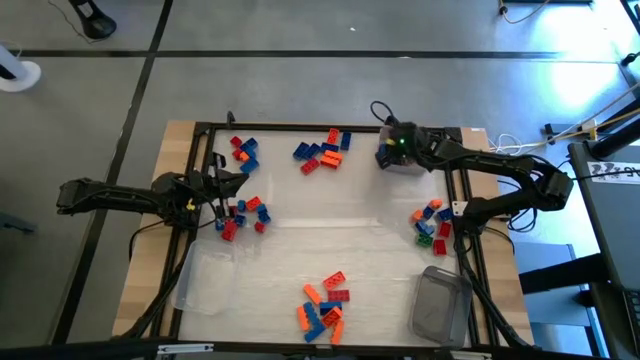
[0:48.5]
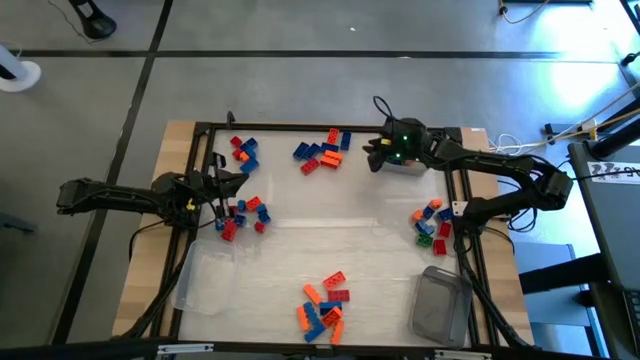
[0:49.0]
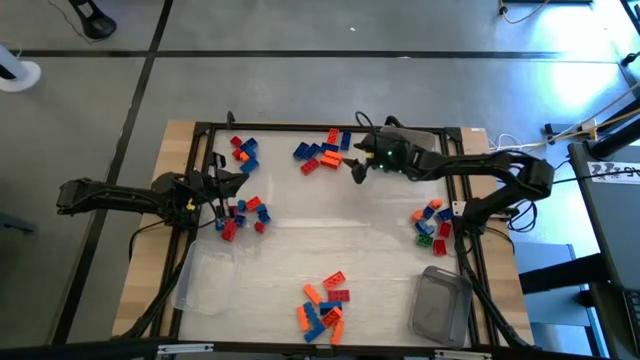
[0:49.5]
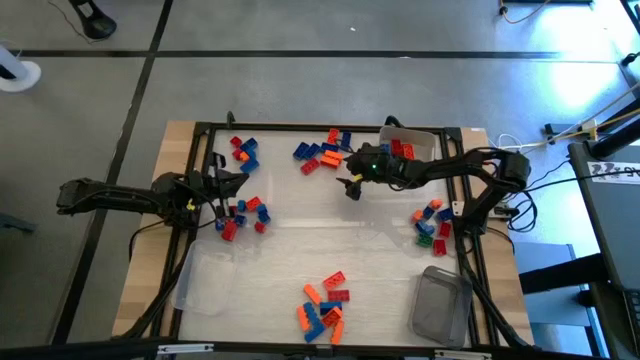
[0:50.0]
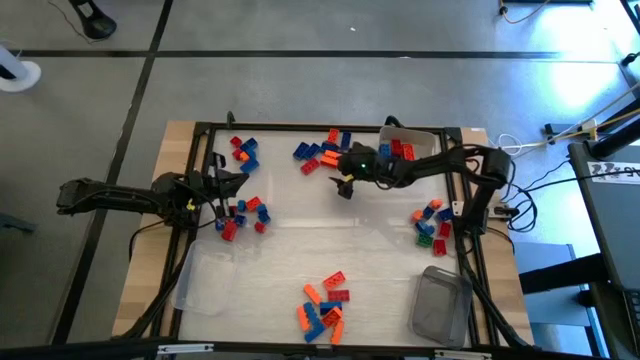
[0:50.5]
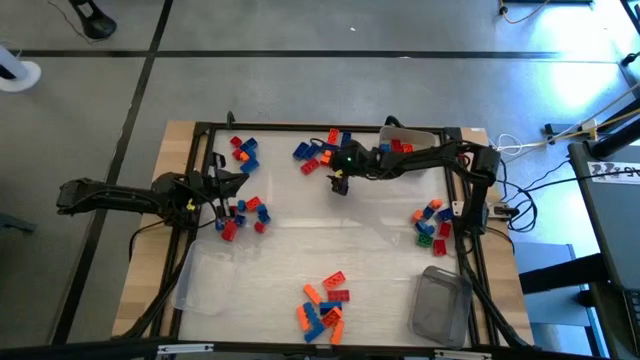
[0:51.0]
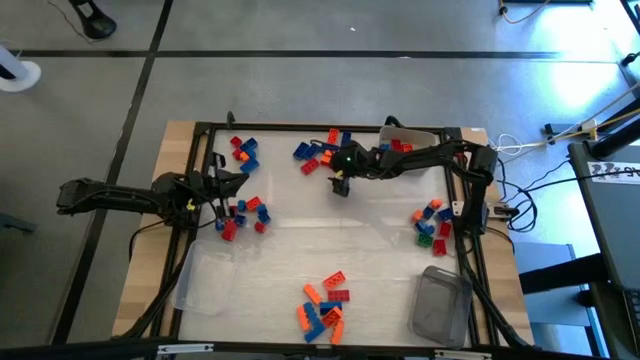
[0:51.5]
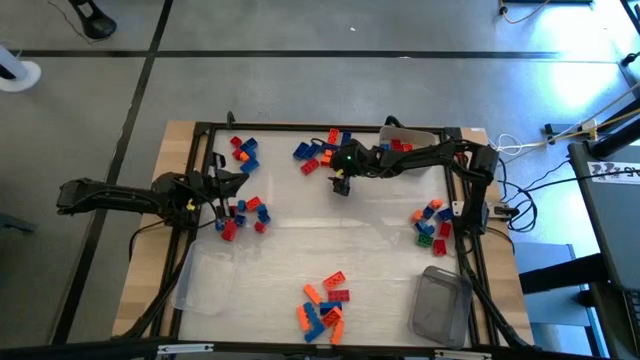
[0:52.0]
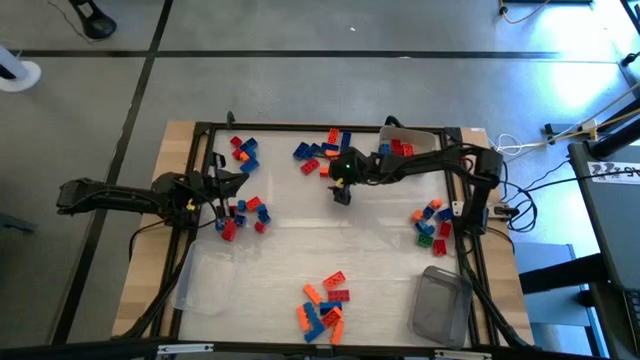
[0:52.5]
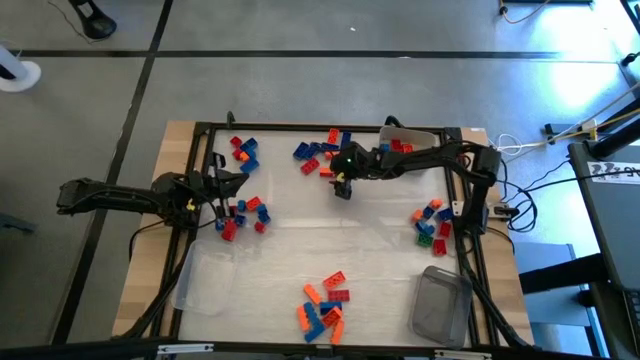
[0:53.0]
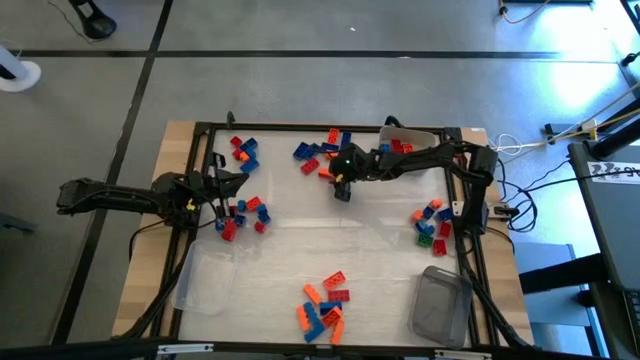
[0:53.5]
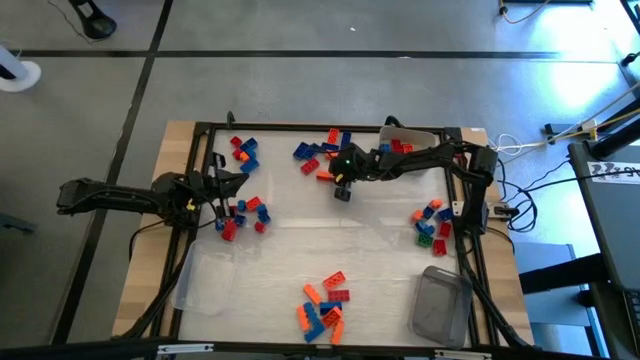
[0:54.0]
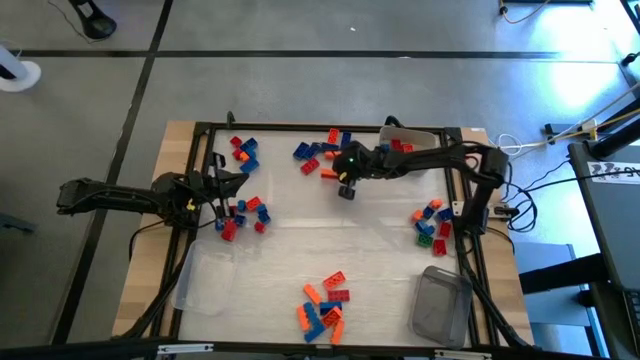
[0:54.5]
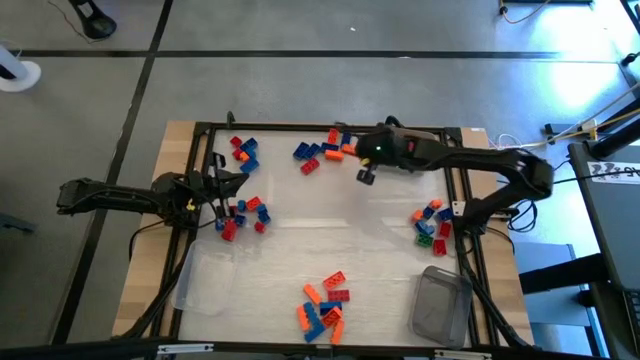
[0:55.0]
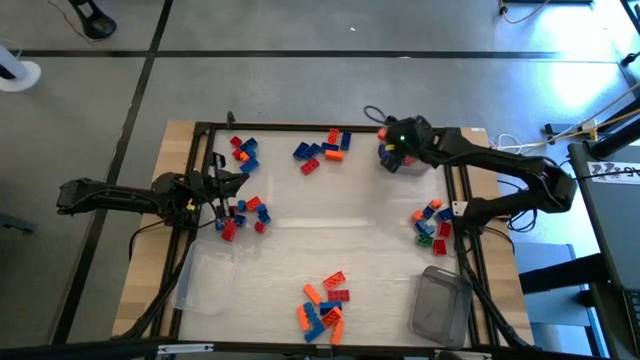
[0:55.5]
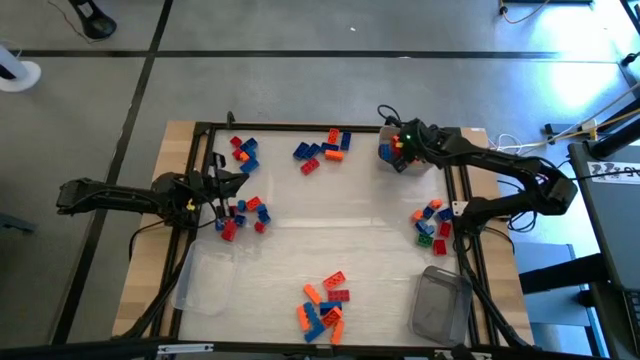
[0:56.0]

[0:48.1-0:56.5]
Task: Sort blocks by size
Put the orange game piece into the gray bin

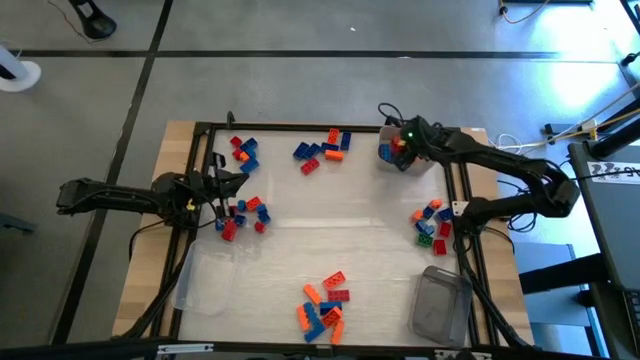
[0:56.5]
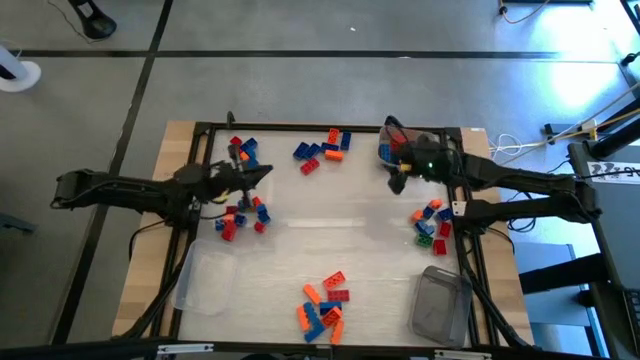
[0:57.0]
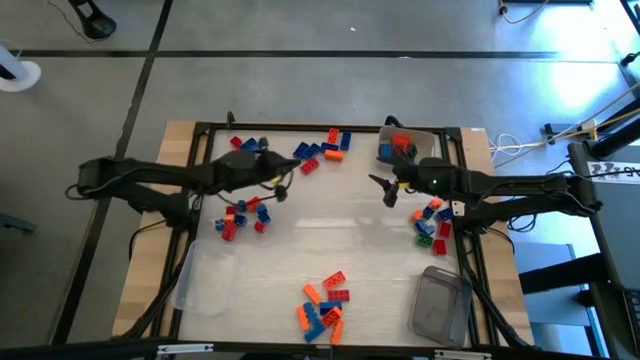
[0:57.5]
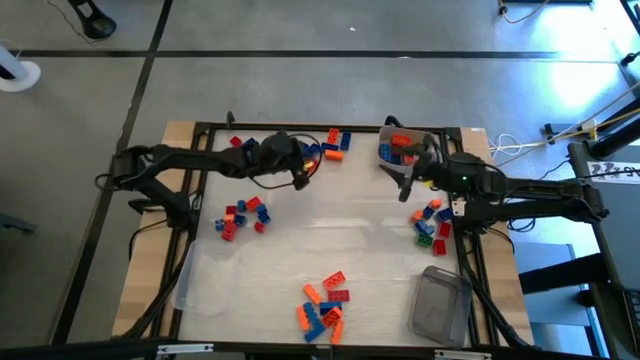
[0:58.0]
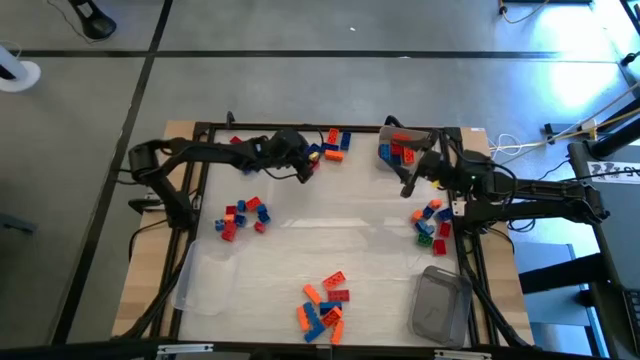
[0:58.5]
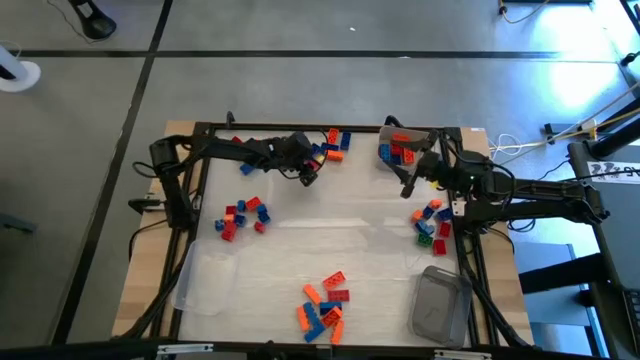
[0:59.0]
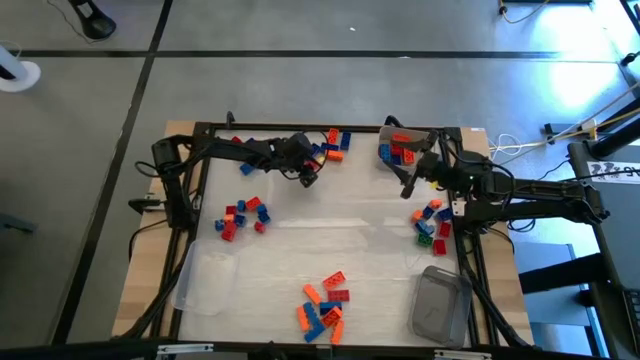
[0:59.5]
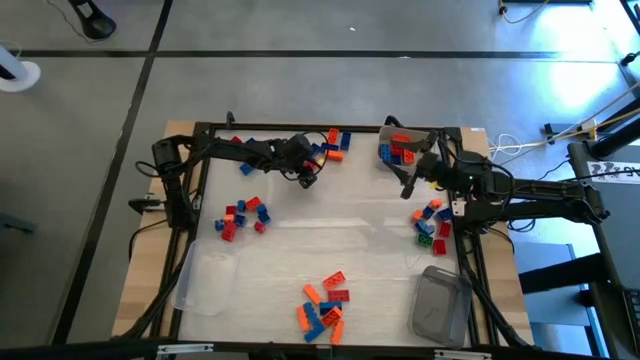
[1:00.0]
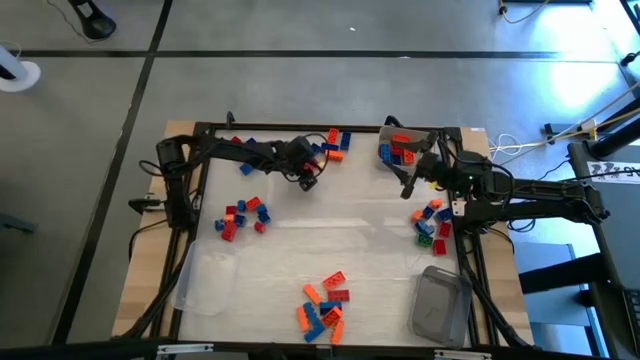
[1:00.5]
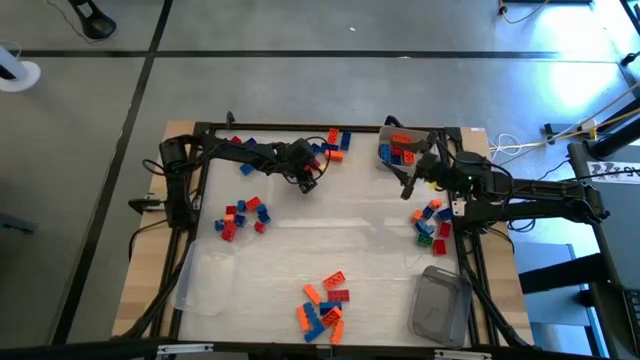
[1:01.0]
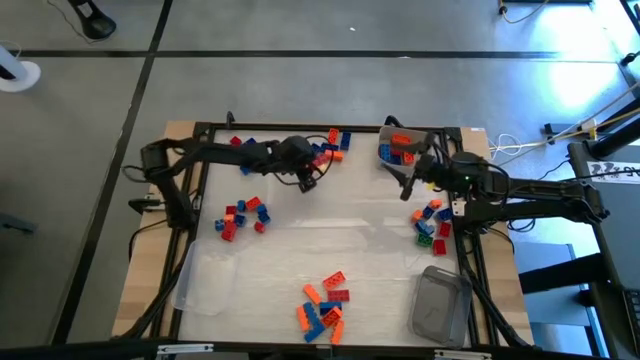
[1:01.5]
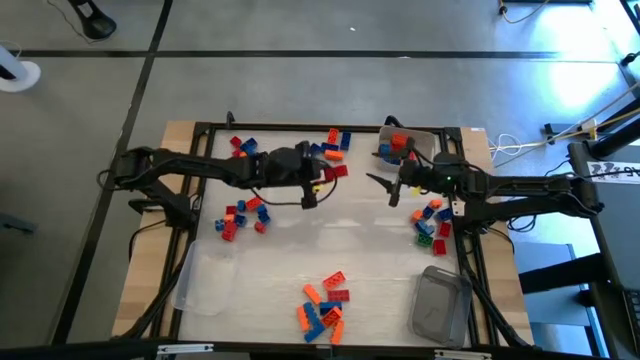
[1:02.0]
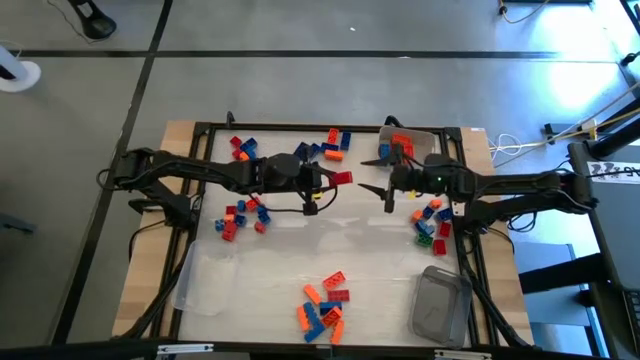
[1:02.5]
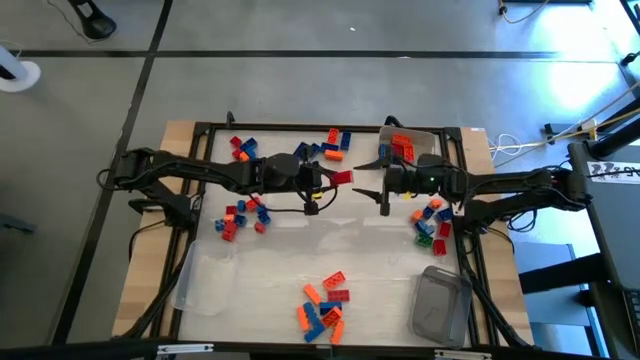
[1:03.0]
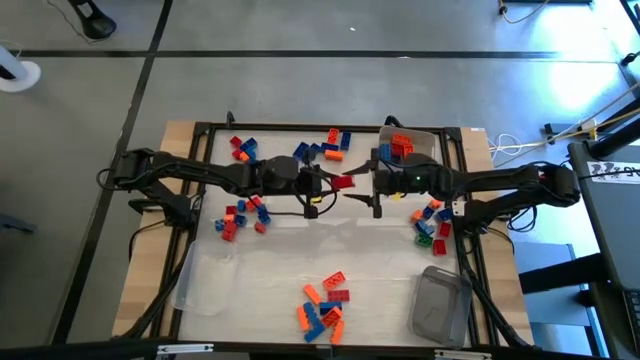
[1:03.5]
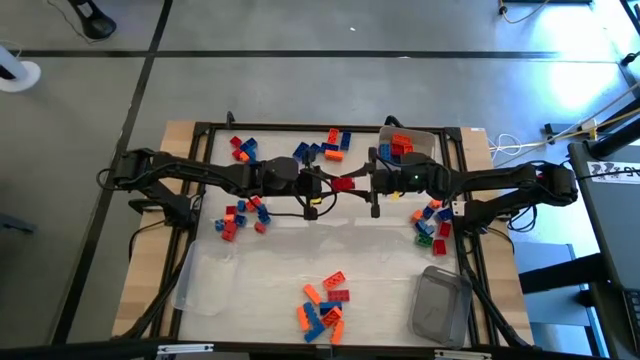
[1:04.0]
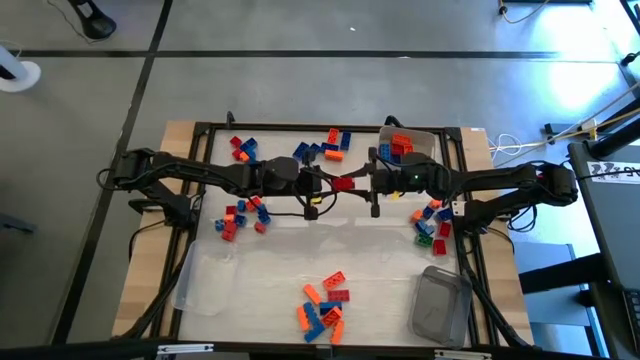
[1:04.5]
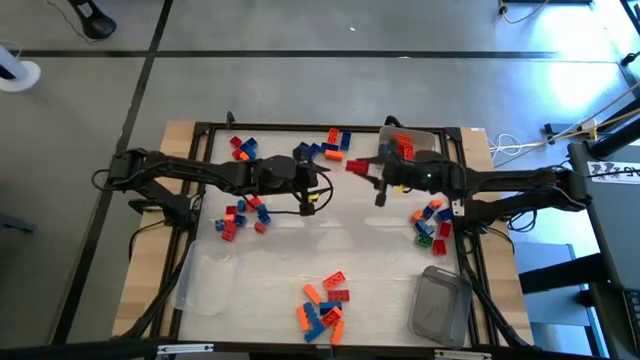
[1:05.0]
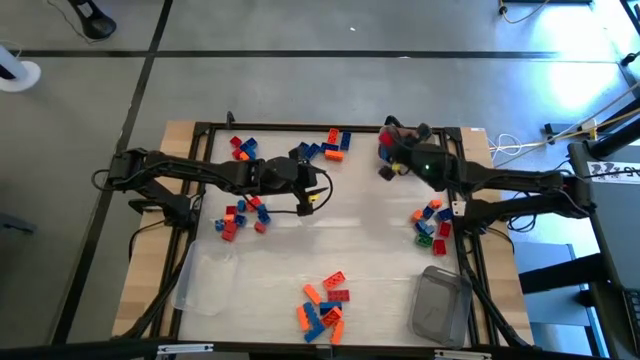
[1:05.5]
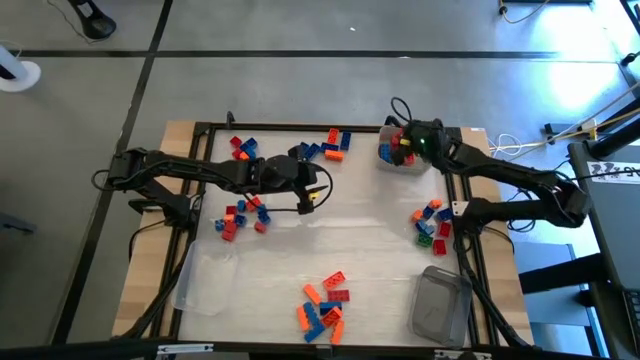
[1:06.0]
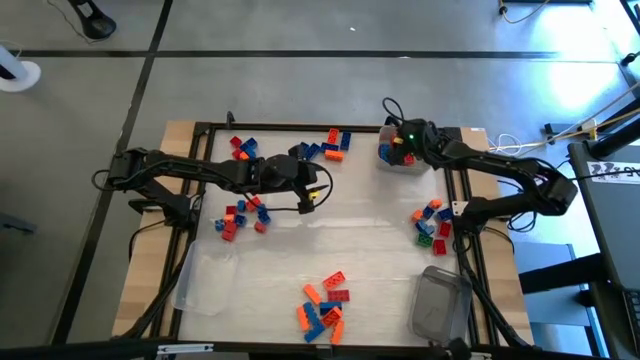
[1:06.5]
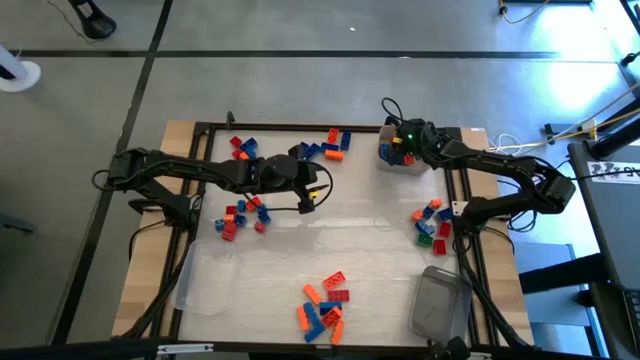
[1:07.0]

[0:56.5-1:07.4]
Put the red game piece into the gray bin
